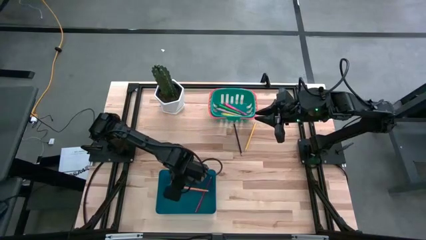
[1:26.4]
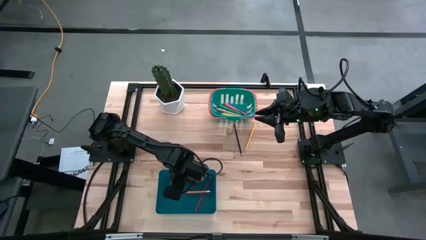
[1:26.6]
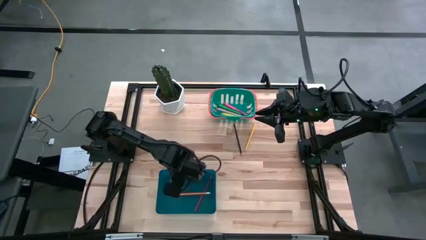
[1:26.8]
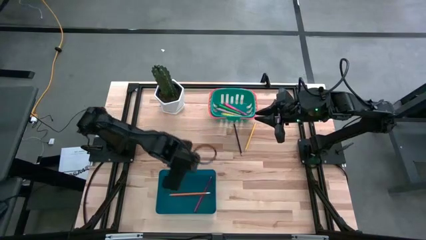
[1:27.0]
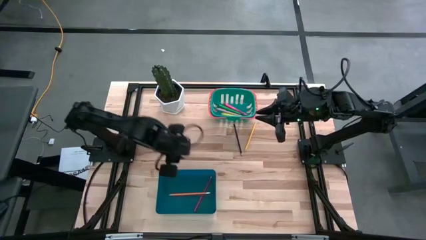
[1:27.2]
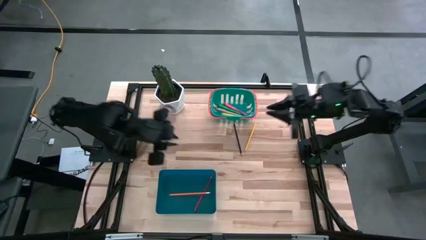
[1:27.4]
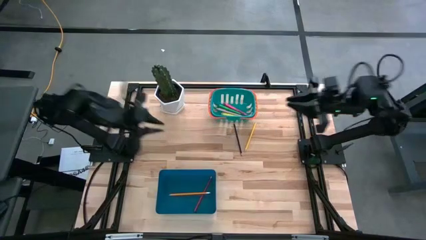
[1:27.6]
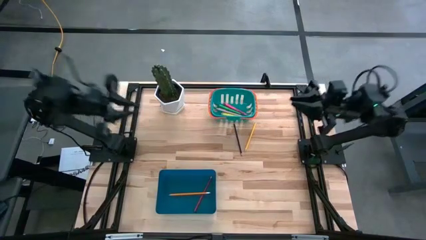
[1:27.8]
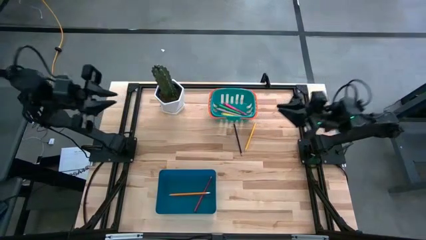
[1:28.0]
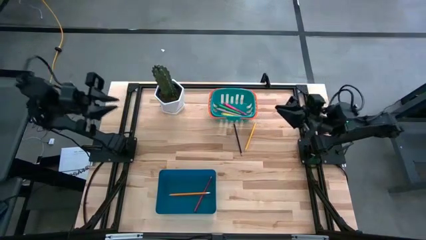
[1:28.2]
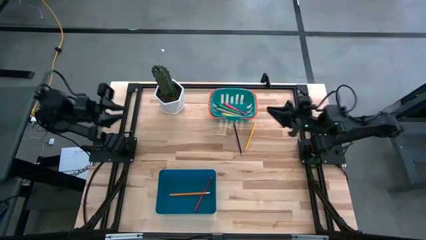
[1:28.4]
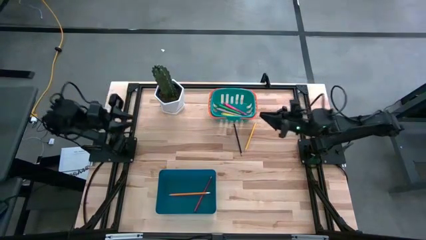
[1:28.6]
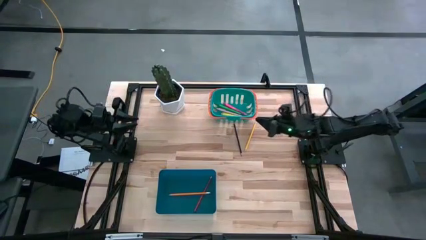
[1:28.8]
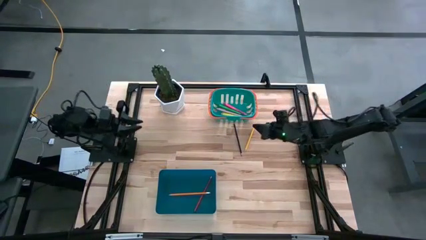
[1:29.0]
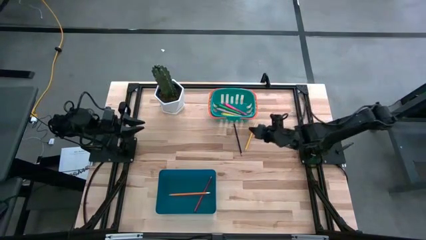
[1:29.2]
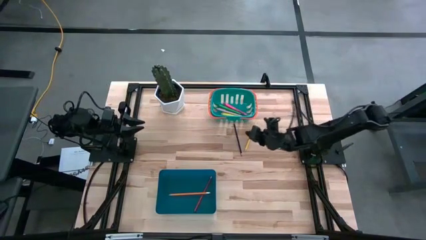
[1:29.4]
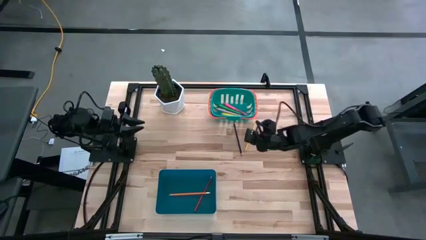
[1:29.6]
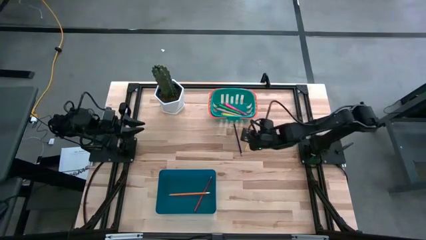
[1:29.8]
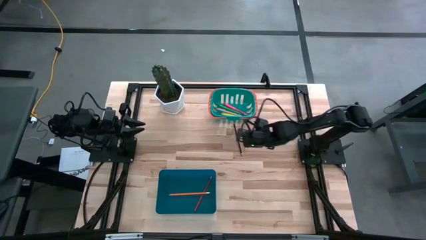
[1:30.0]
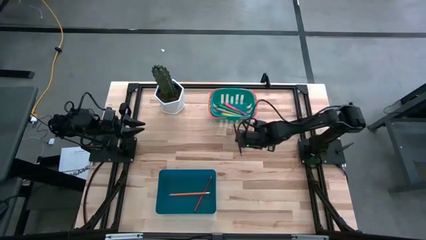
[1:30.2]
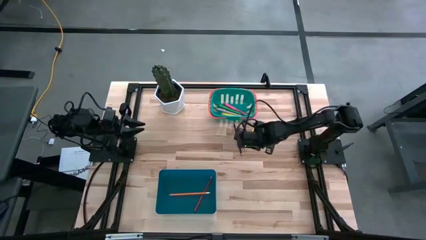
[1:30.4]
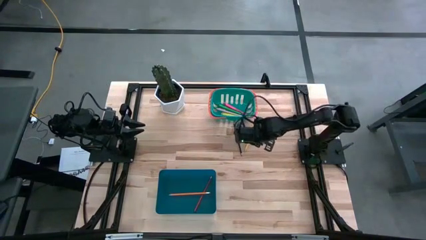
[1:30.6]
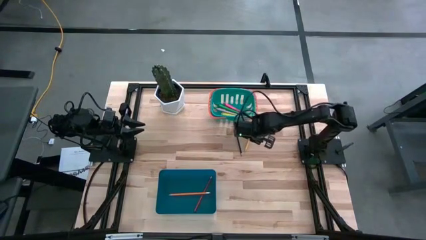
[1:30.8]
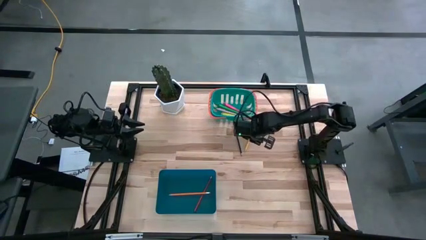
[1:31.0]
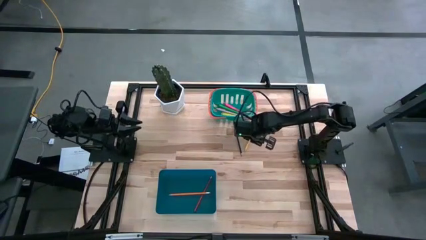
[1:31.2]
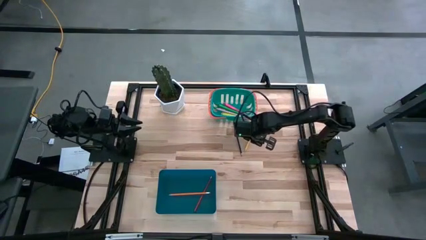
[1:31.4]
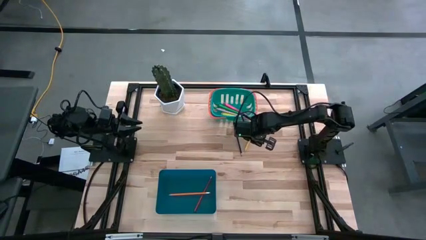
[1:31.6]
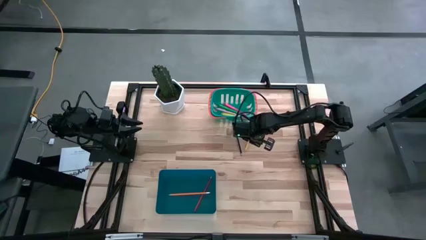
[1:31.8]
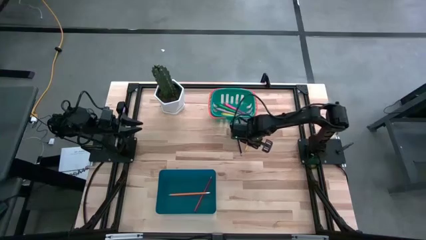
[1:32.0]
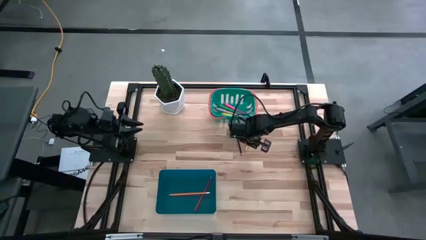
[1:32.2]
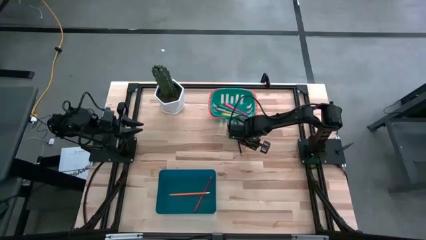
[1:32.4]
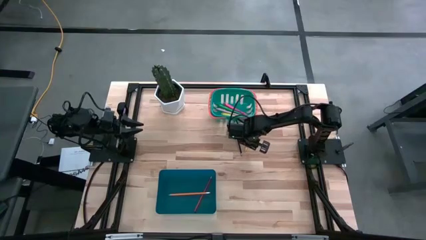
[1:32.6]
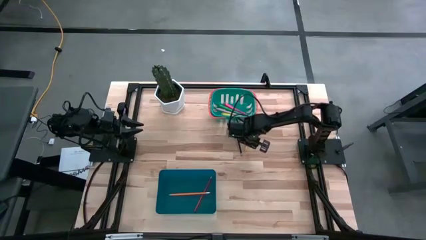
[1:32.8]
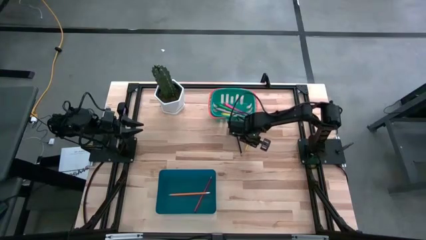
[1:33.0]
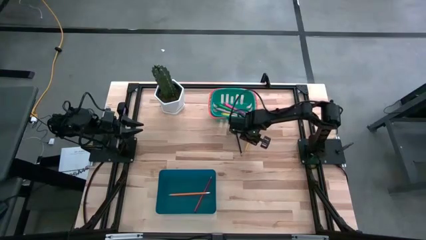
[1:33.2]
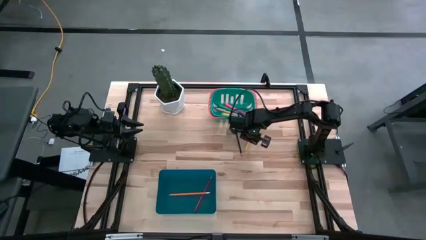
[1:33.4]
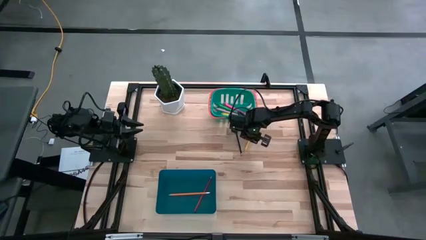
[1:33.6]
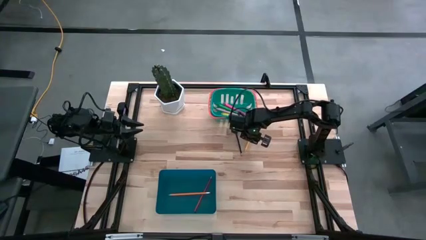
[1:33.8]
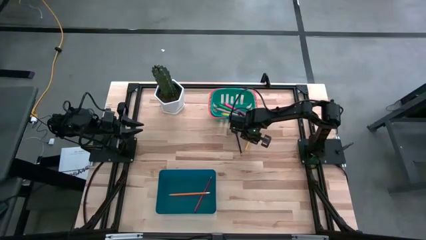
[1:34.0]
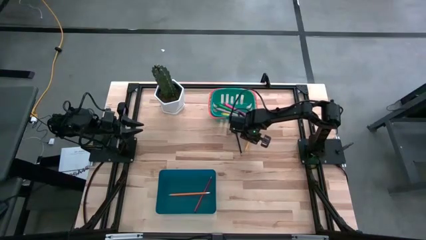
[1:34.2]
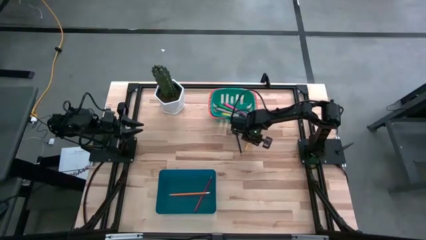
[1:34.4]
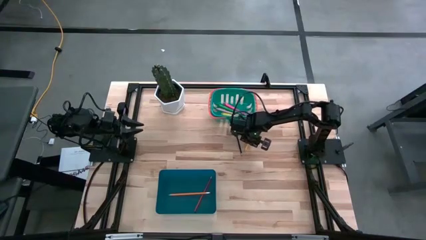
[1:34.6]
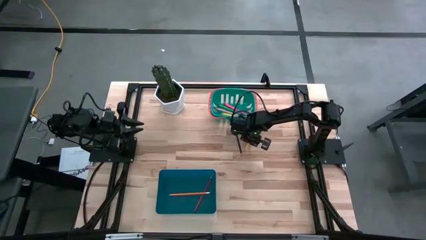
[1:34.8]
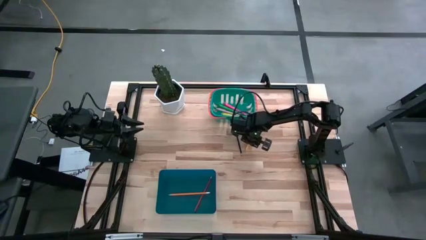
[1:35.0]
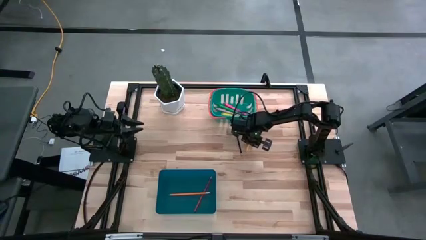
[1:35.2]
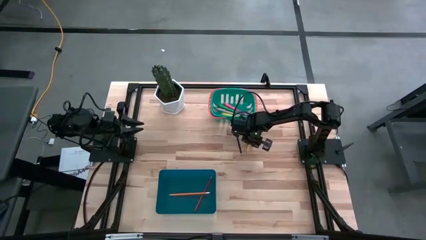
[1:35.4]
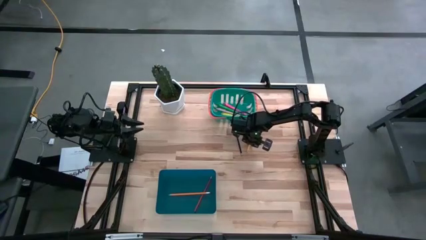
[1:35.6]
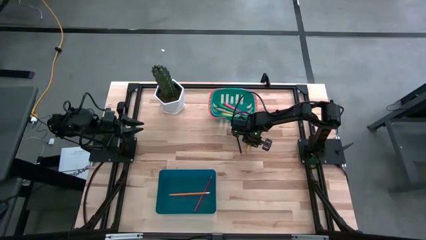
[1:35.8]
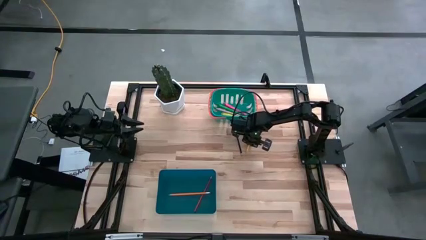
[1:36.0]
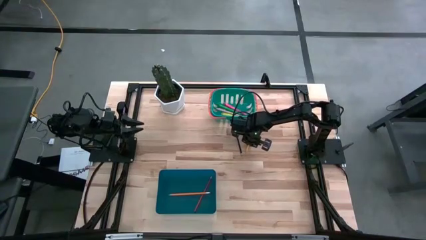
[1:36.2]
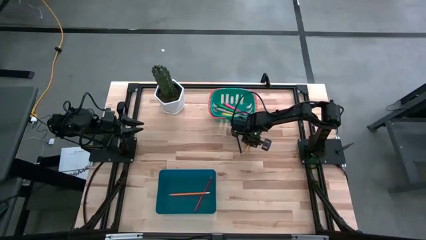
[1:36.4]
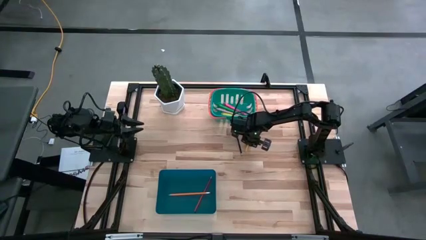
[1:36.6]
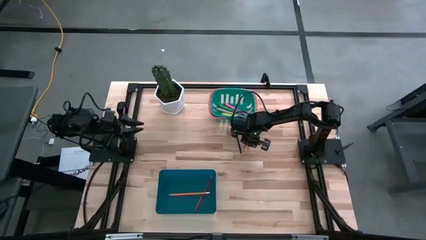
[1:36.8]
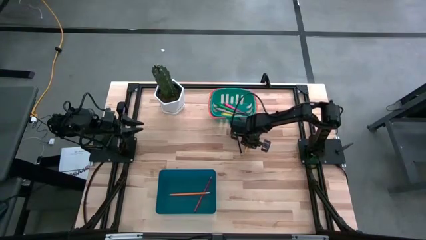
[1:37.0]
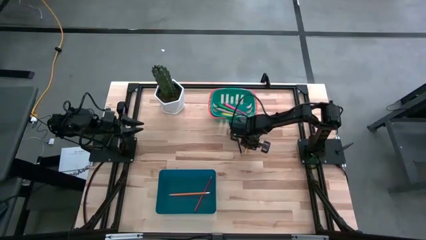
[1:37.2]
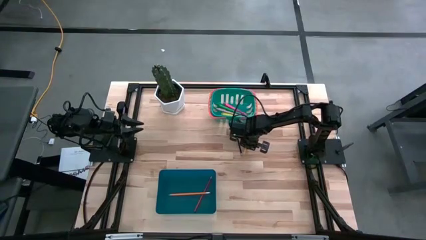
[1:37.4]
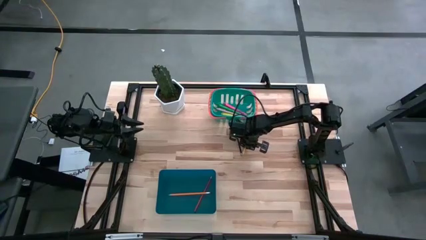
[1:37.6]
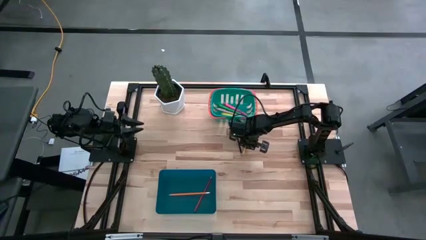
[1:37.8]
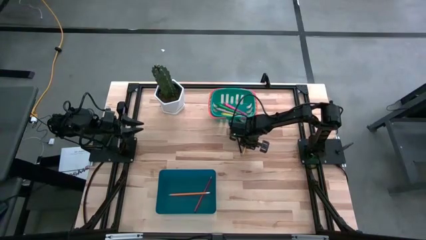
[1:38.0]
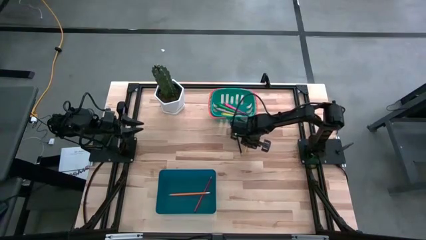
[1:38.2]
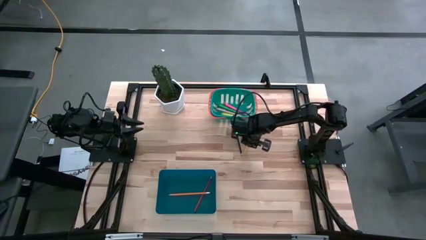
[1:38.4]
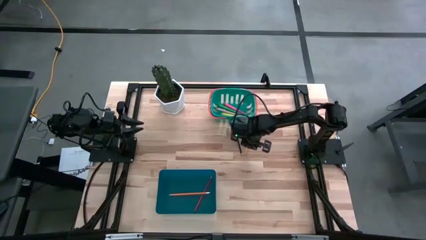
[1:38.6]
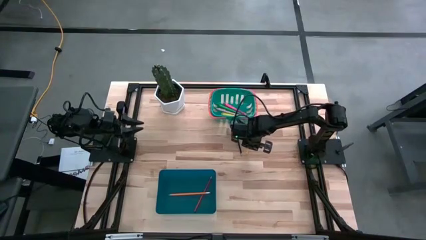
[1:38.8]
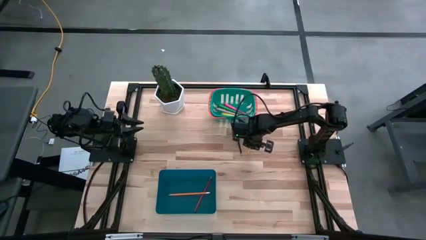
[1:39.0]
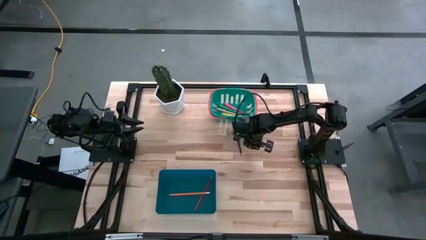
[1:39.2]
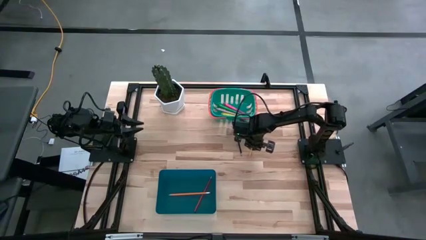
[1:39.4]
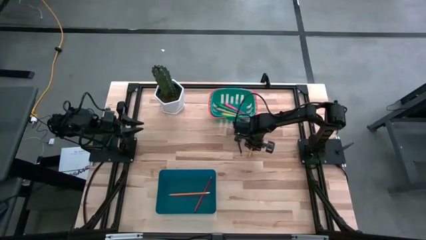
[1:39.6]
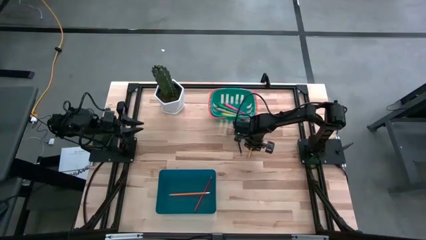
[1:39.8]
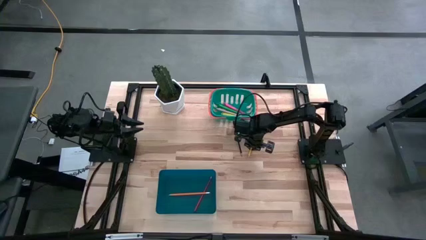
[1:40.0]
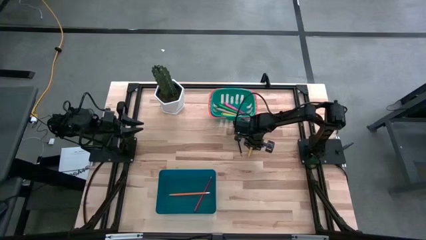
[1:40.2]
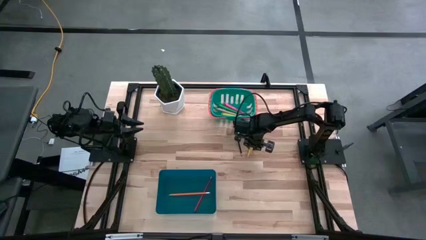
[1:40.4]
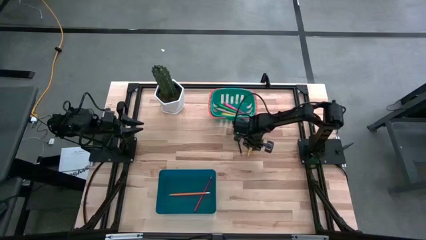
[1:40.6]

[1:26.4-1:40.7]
Task: Sort pens & pencils
Put the yellow pencil into the blue bin
